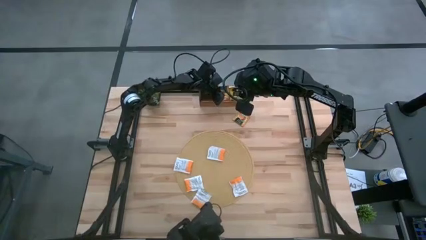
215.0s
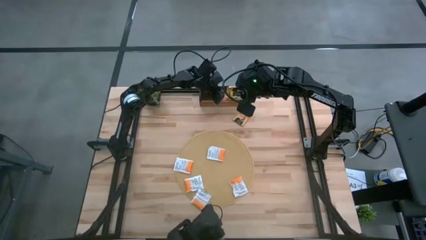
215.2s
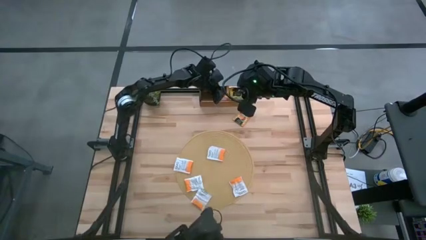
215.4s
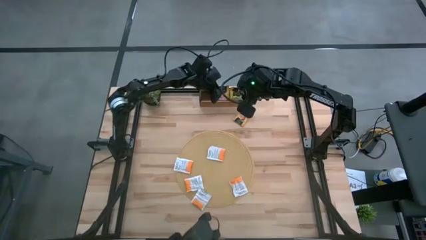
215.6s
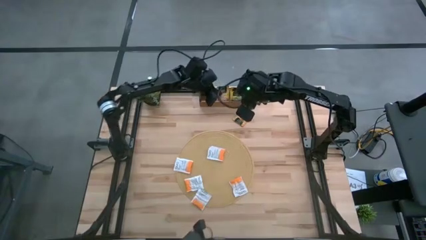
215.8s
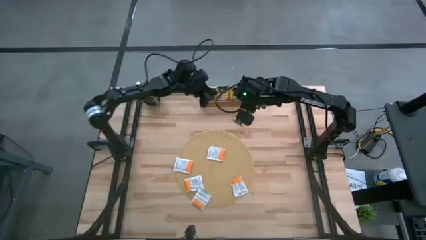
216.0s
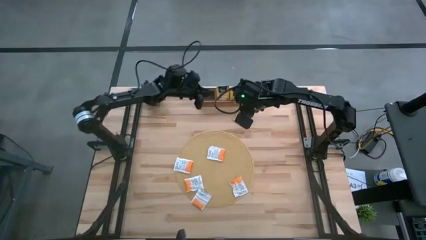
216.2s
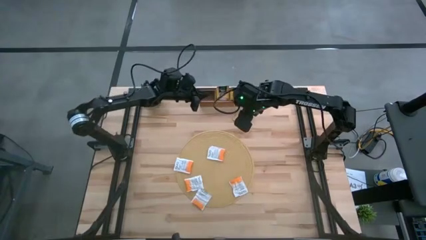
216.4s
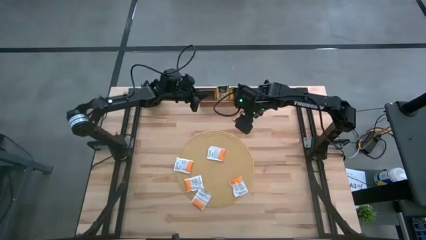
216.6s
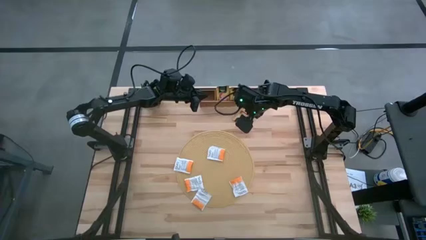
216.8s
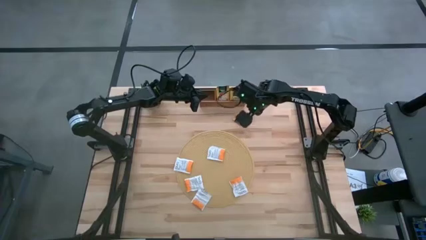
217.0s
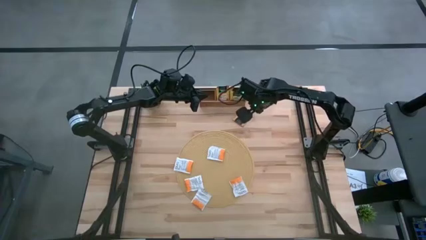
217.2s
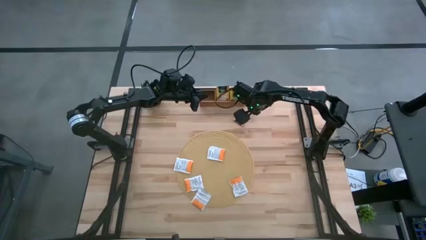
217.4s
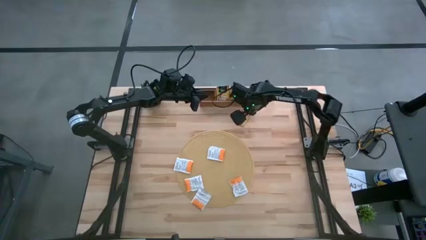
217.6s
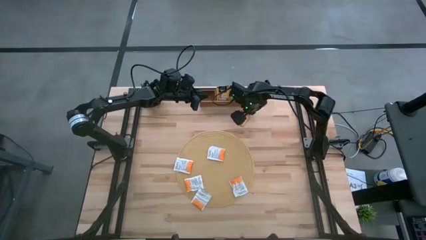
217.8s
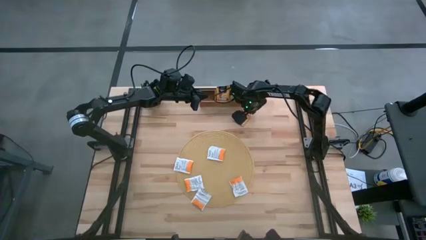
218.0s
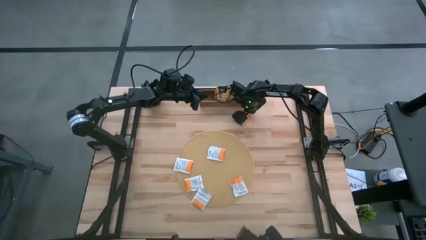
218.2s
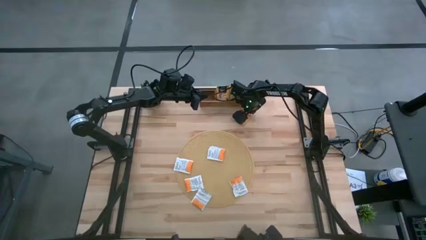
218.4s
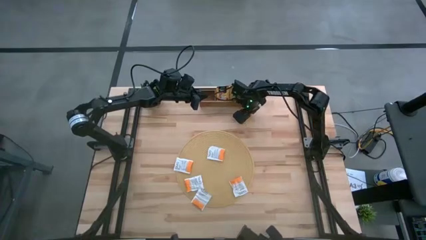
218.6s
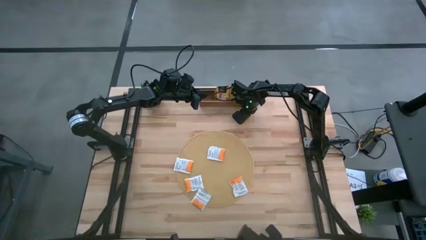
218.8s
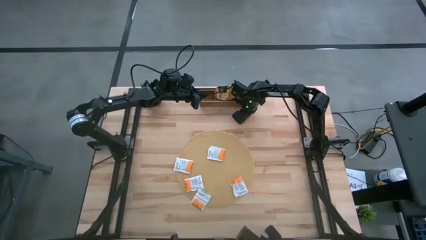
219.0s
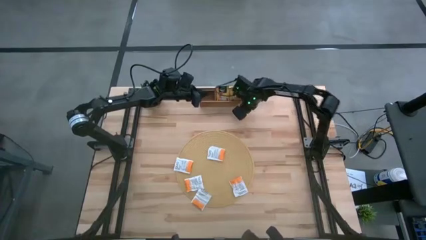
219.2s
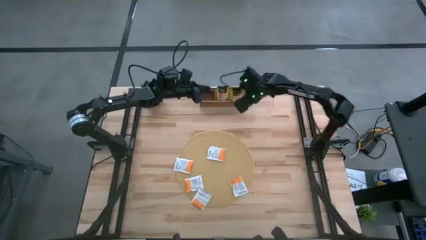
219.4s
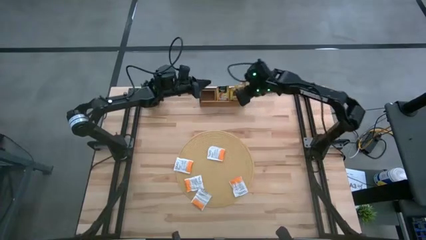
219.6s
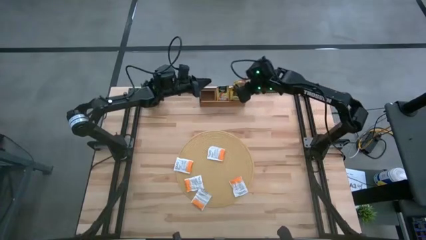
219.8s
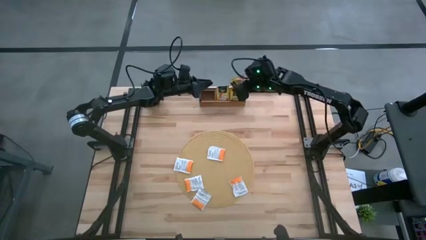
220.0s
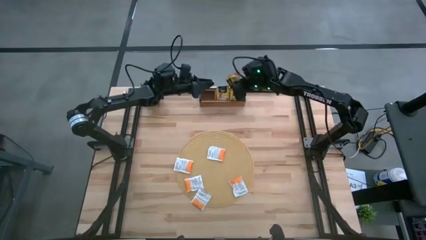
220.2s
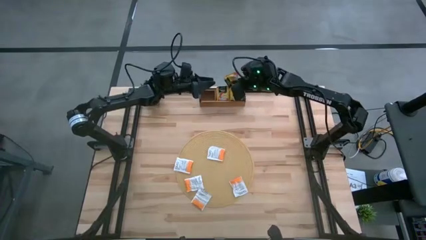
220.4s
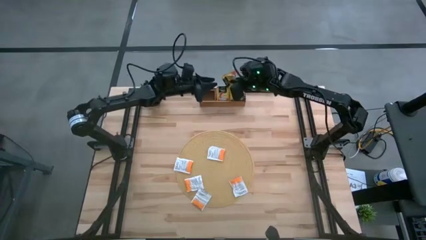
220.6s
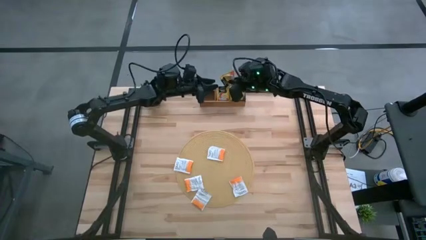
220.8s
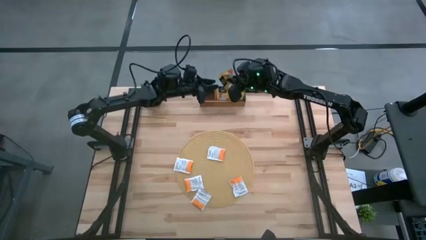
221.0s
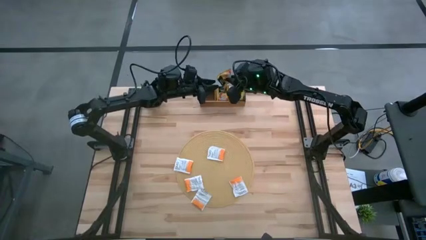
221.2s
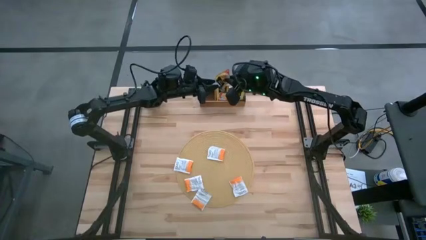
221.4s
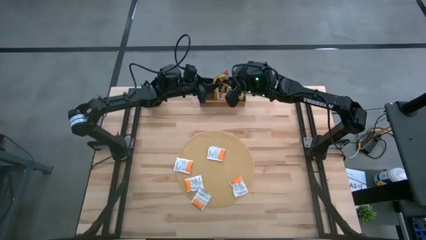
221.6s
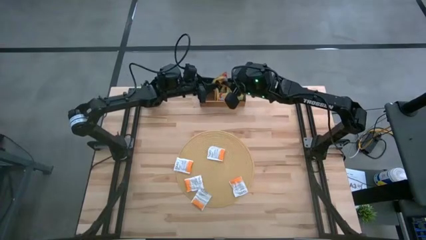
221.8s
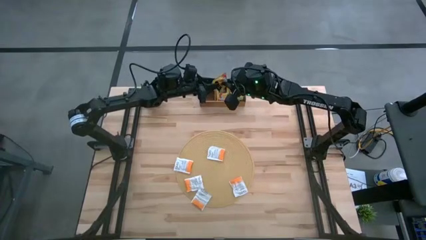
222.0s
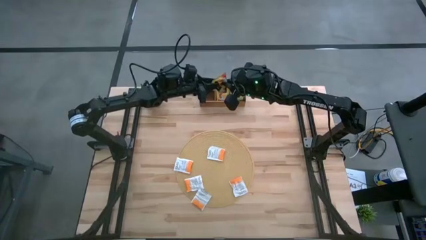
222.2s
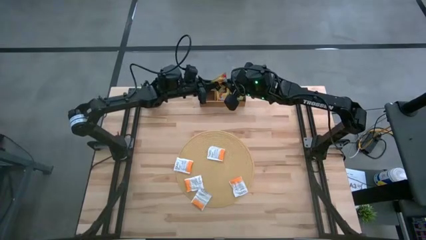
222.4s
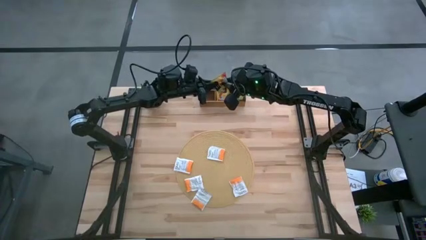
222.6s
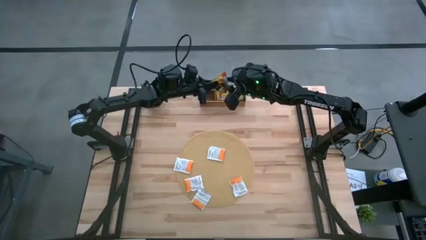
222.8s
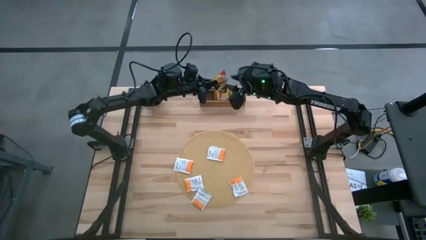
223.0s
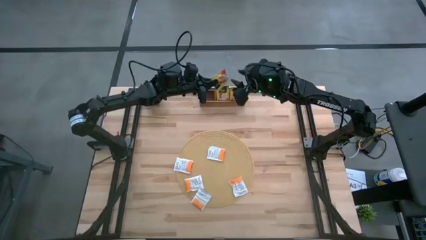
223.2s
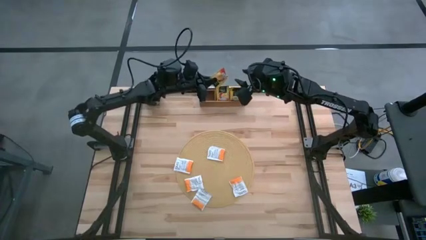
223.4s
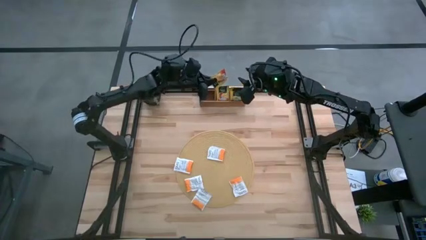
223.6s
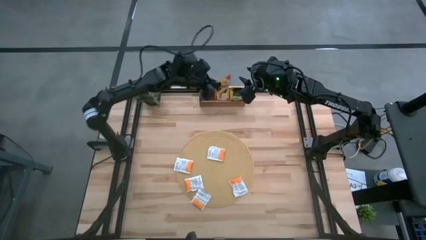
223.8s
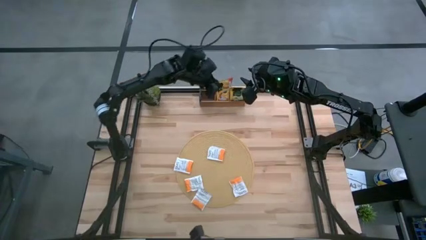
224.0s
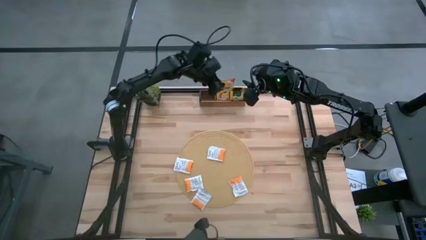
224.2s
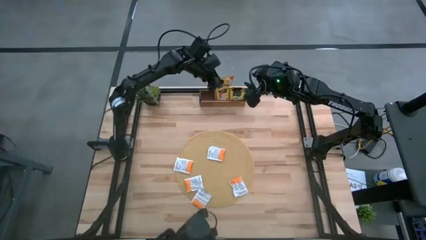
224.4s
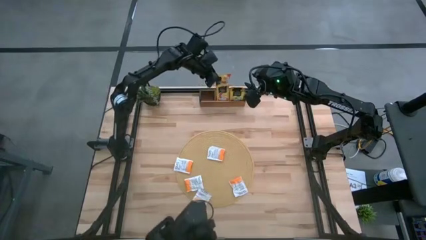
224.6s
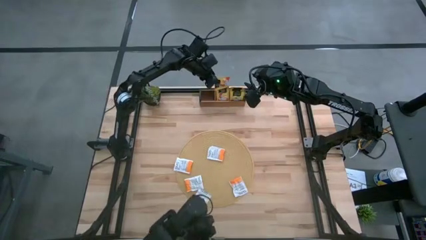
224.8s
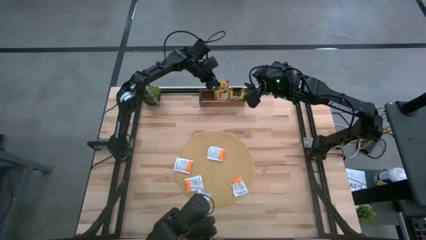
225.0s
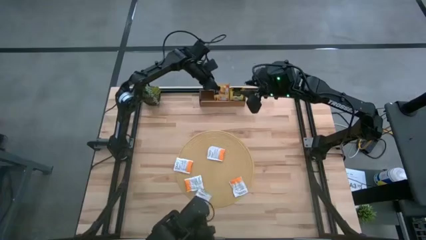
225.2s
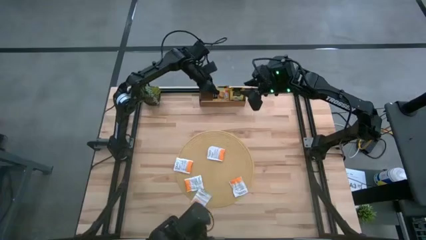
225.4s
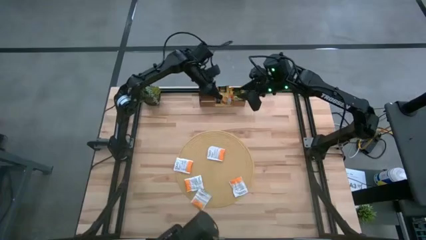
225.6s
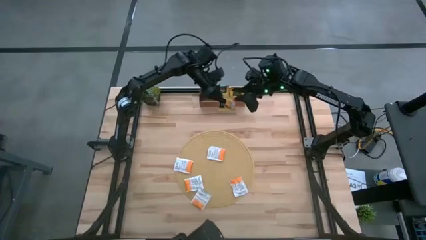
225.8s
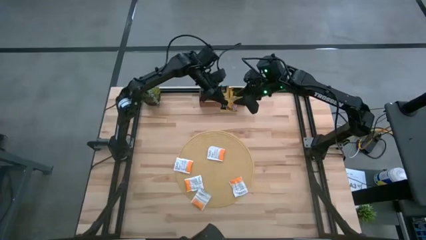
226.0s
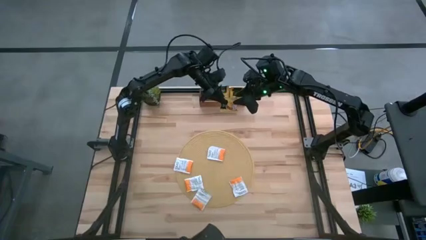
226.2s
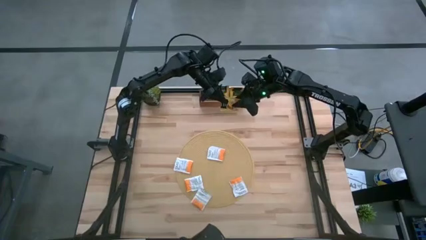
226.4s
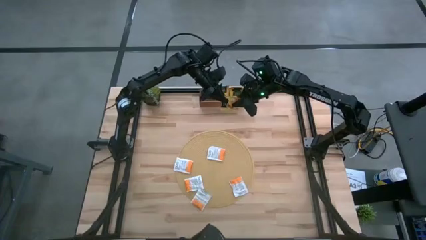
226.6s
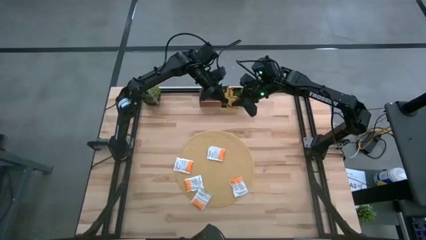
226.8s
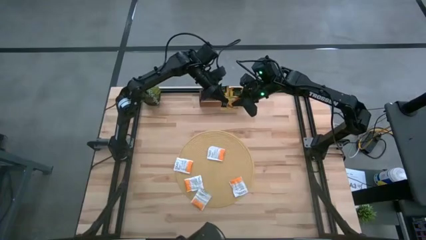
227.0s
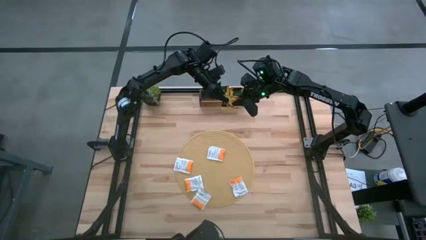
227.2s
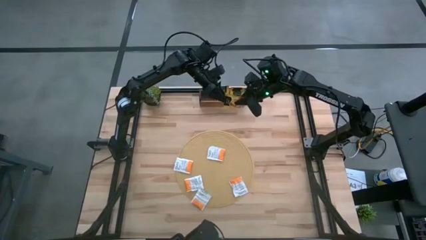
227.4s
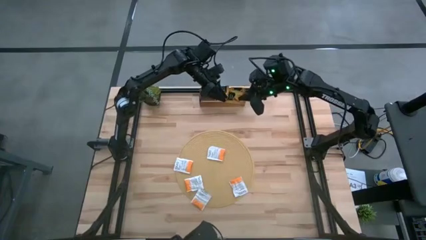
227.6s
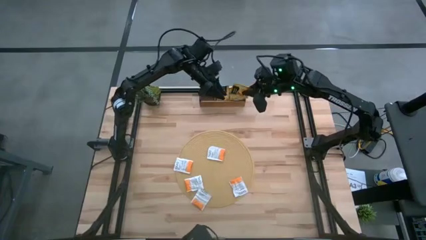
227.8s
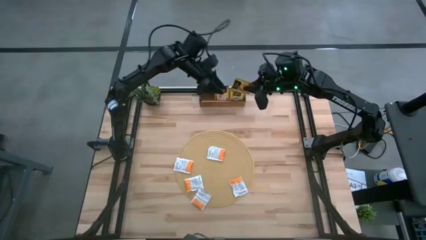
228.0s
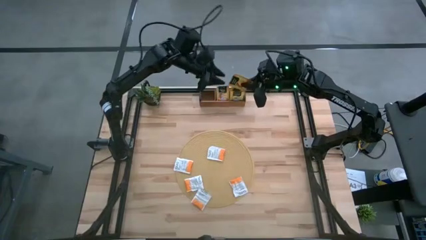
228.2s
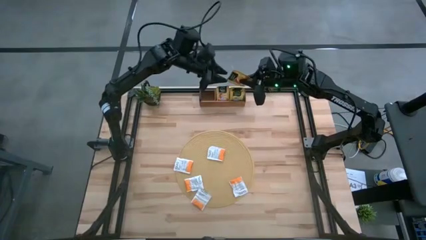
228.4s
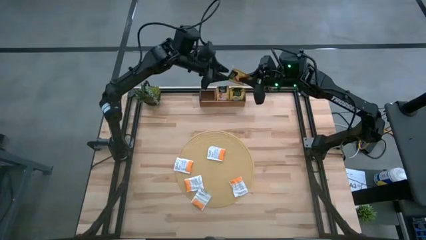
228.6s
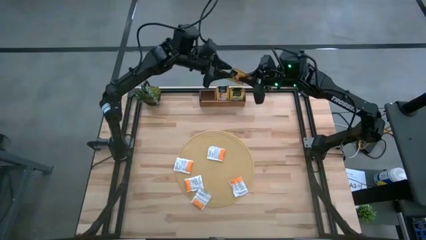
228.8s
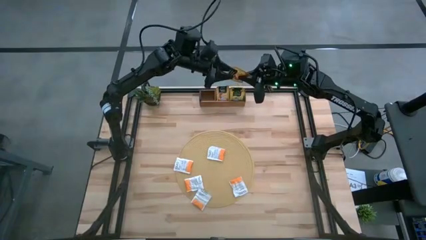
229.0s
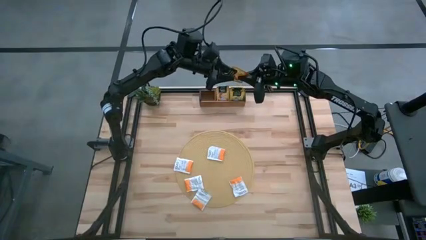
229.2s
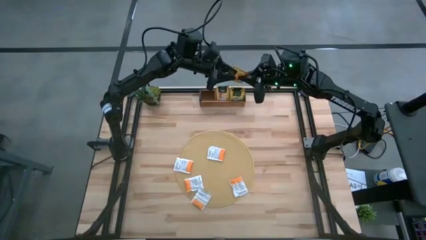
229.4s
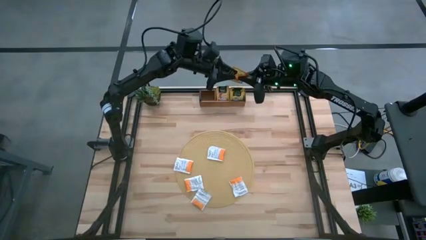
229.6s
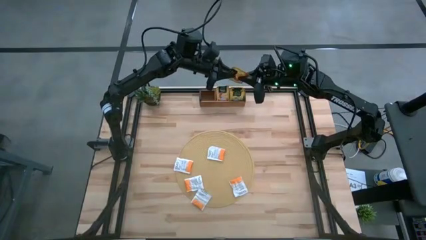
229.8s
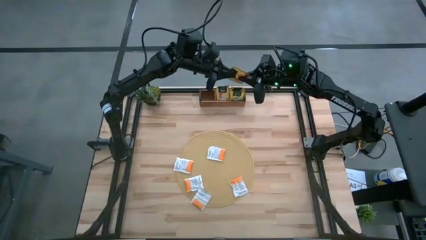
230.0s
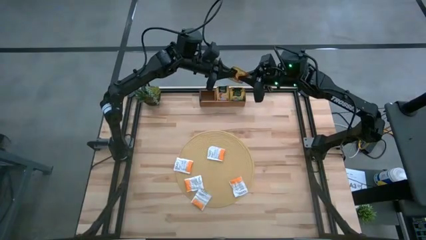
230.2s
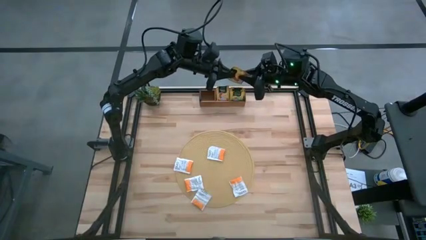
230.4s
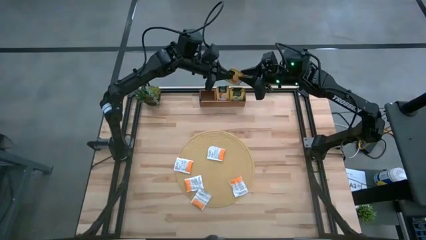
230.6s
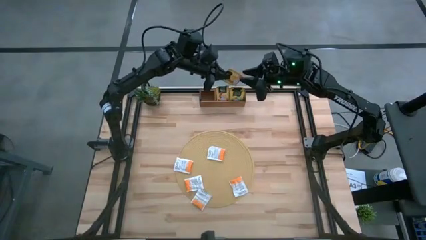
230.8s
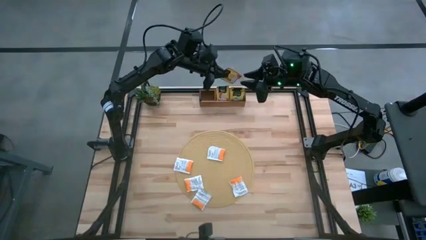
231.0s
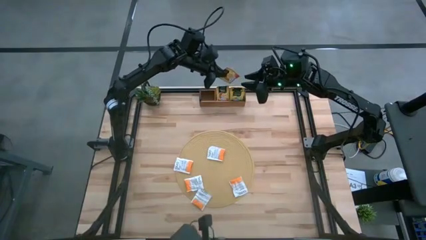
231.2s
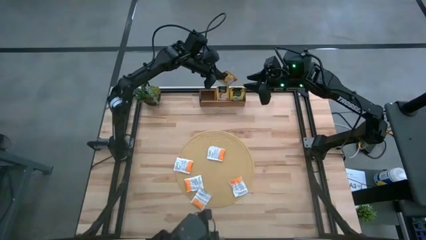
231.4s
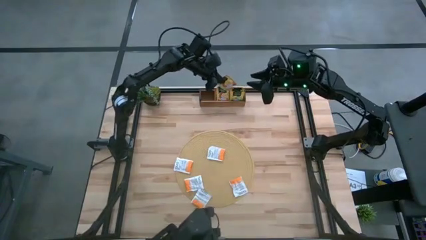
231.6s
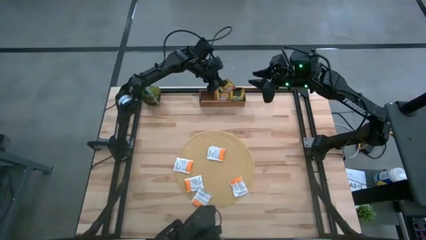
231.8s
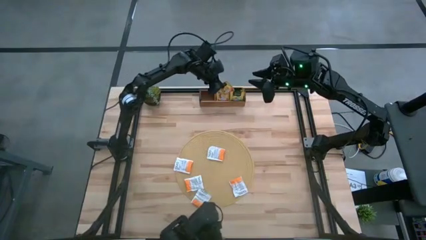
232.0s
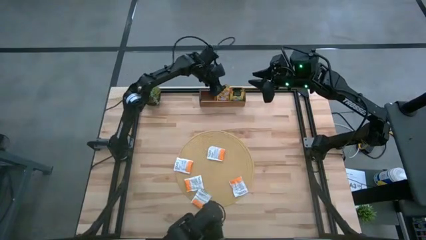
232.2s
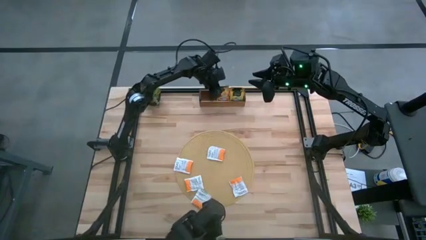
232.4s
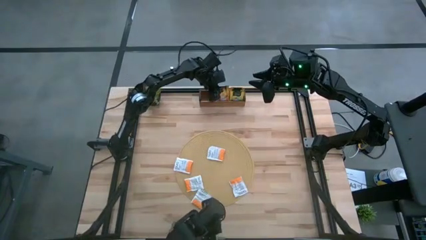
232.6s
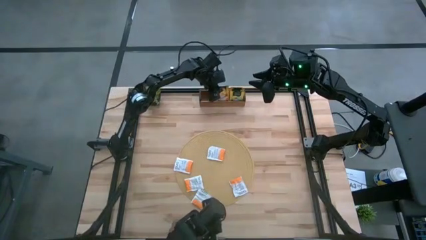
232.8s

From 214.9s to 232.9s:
Task: Pick & Place Tea
Put the red tea bag into the middle section of the wooden organizer
